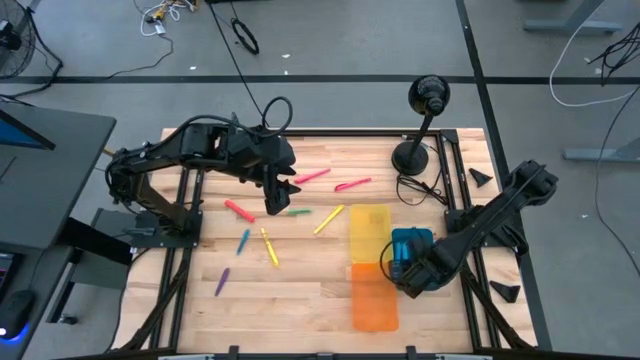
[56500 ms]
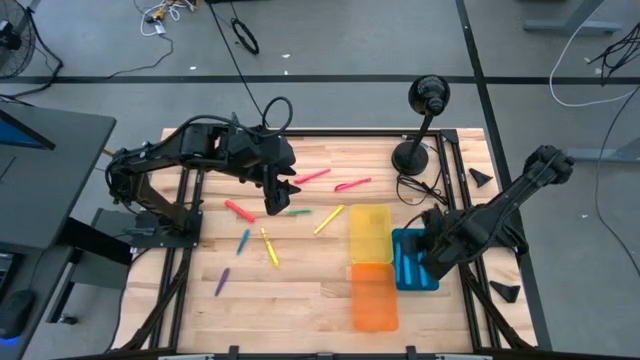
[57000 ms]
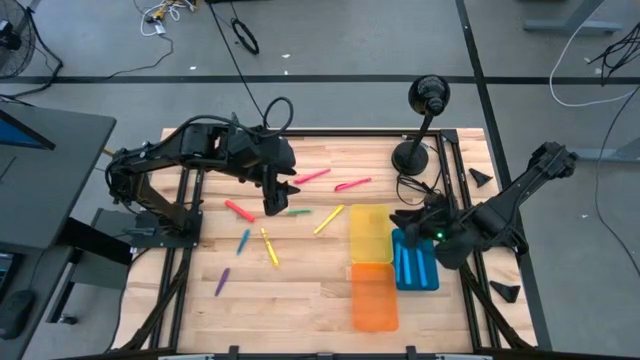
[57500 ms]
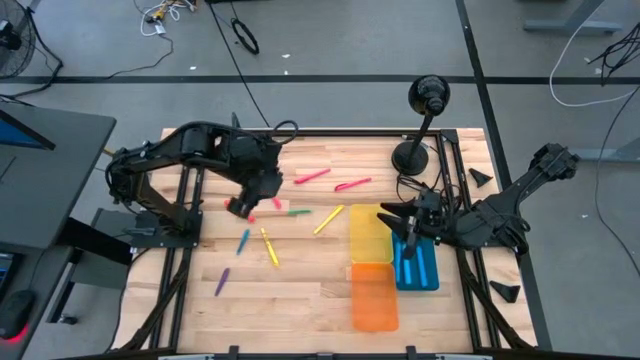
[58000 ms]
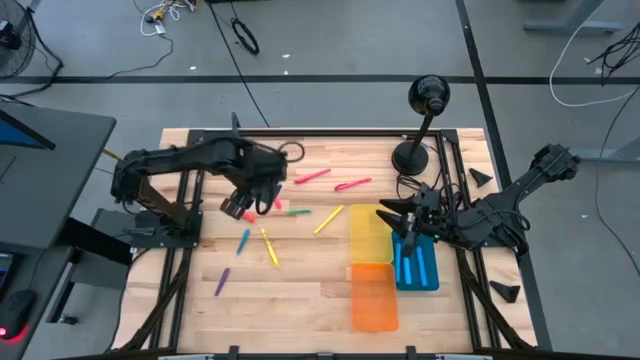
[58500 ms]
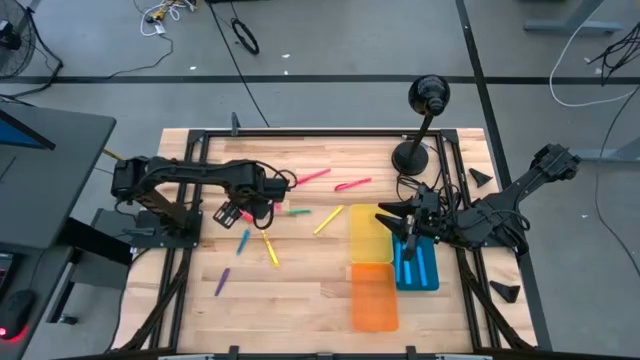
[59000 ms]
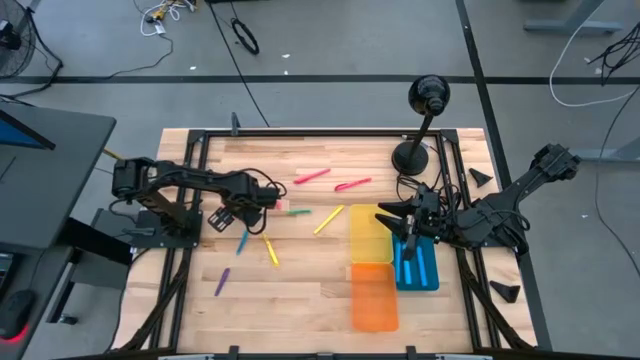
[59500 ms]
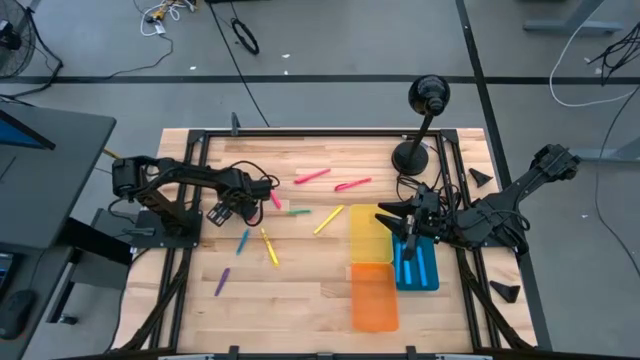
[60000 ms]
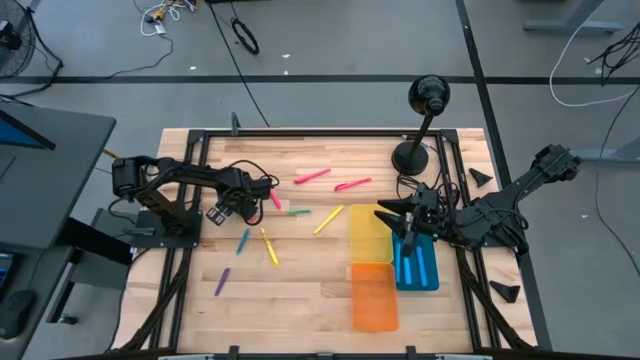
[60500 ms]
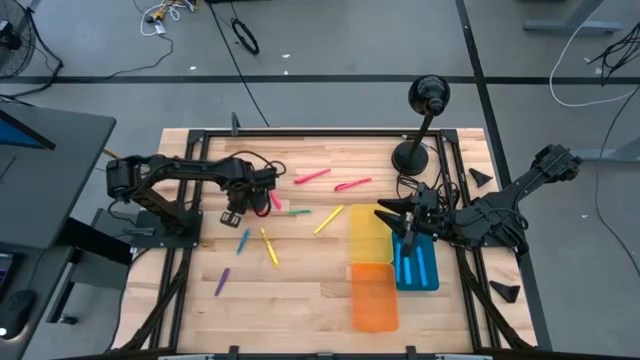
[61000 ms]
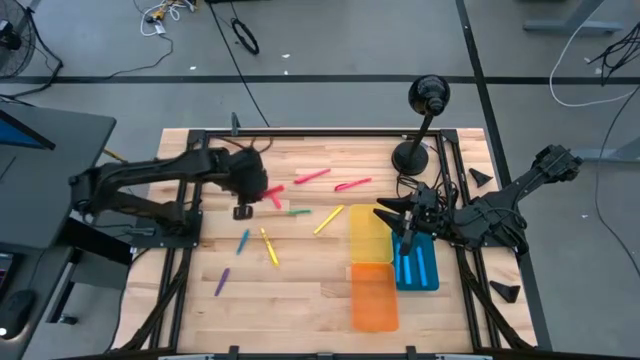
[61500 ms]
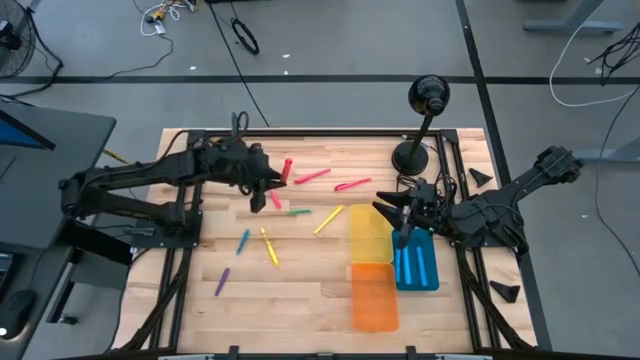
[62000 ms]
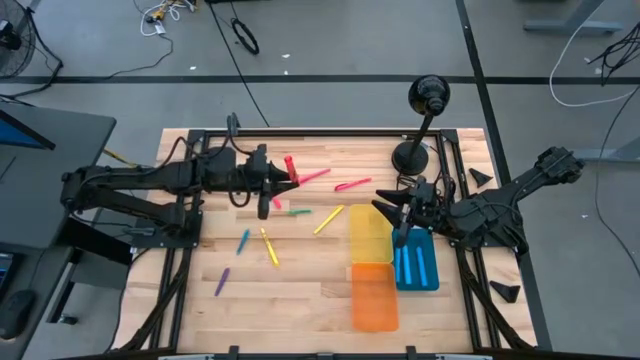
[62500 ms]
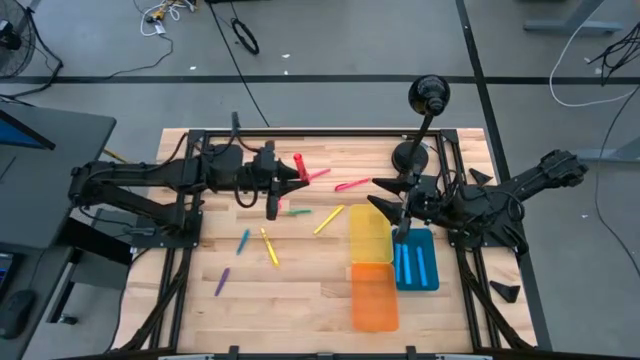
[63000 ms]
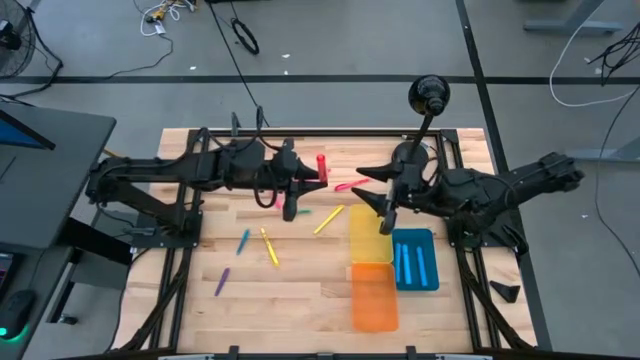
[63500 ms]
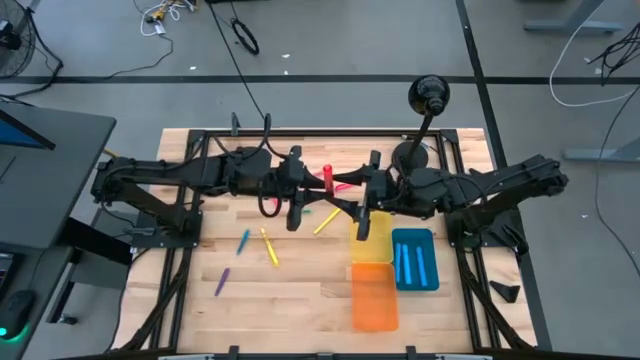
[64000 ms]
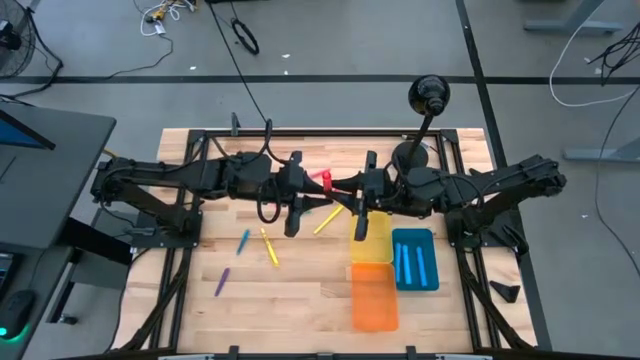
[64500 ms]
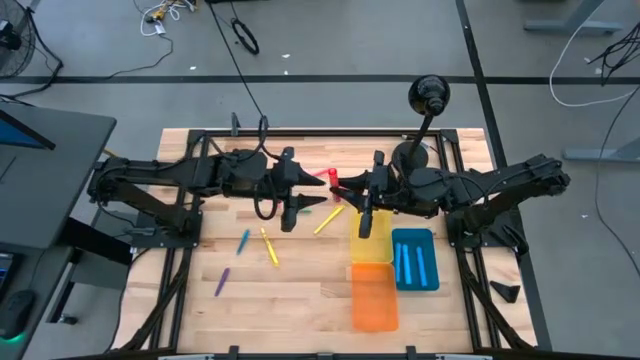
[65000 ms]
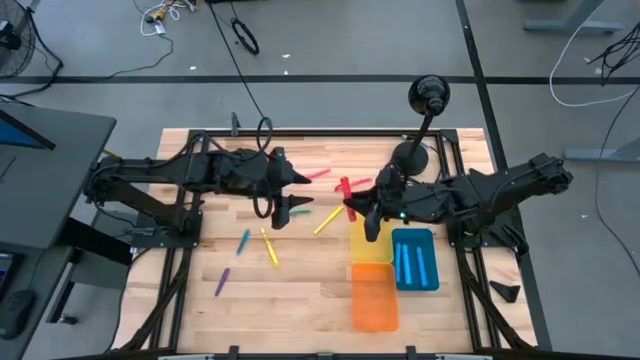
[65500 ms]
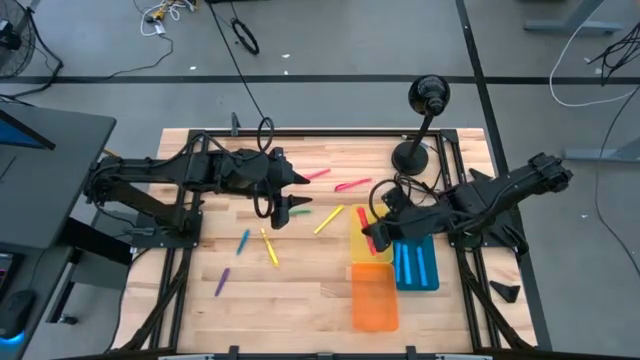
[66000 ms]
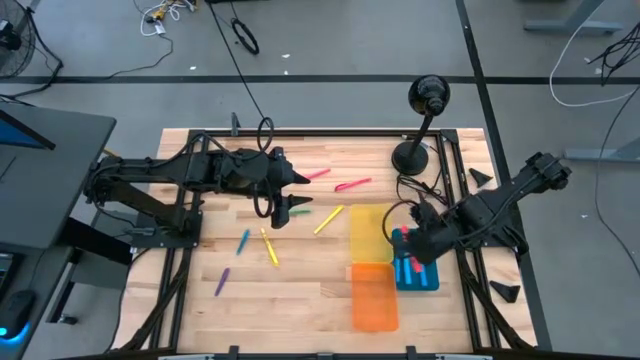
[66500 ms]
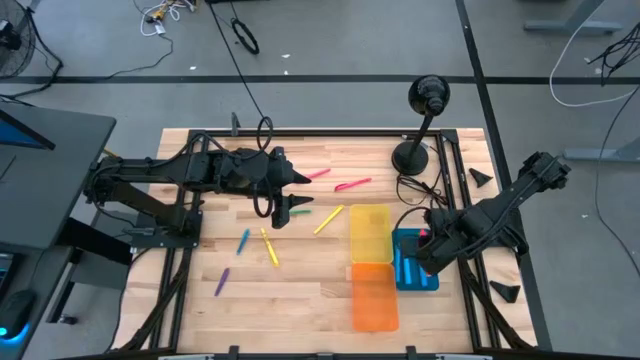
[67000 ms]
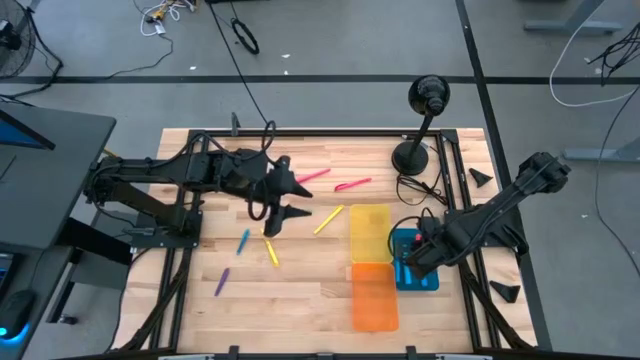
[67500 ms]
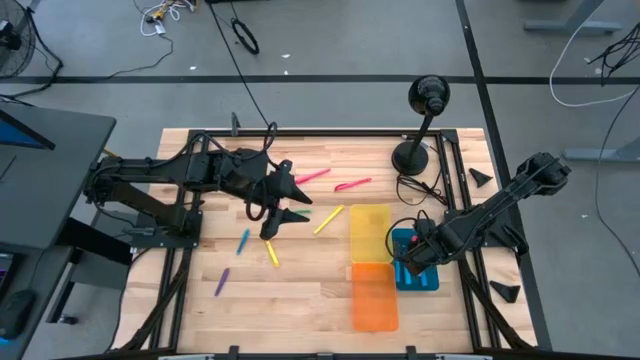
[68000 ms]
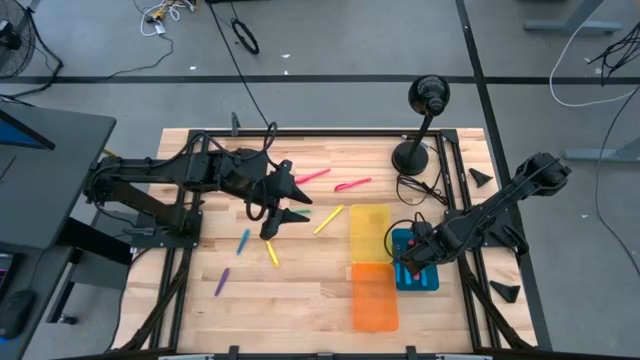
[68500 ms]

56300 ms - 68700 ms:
Task: Pick & Place Markers
Put the orange highlighter into the blue bin

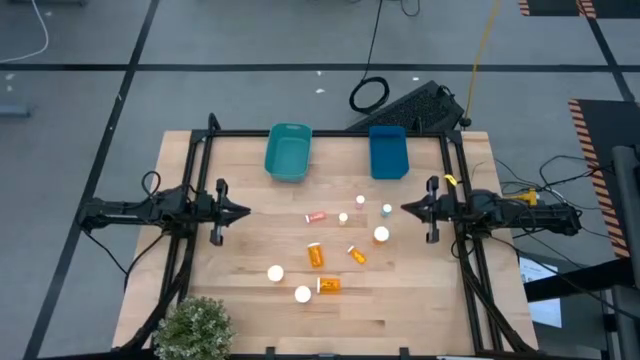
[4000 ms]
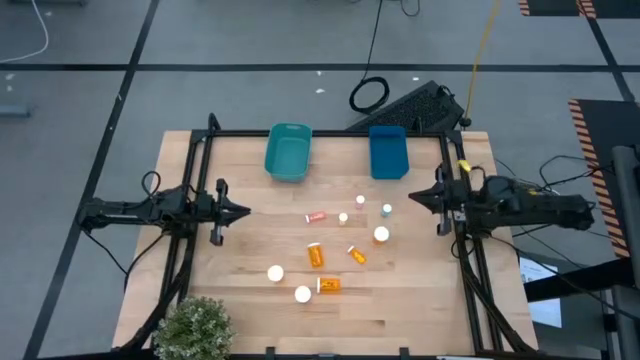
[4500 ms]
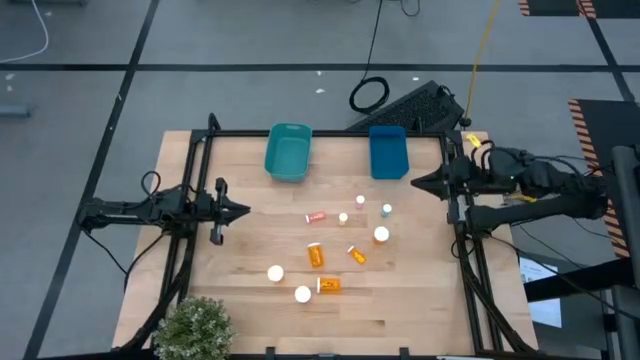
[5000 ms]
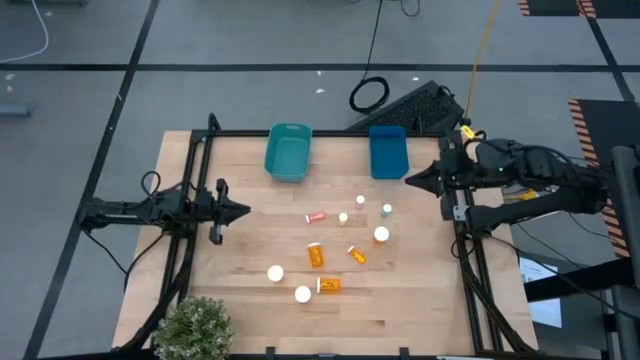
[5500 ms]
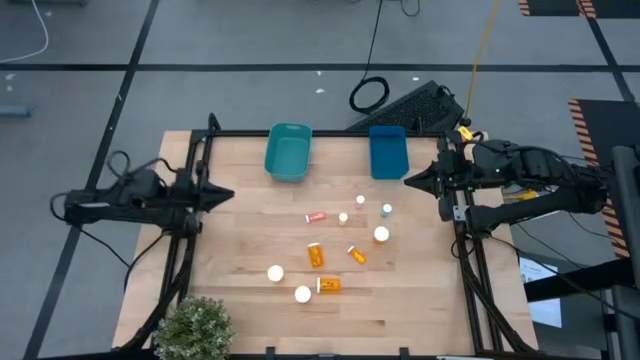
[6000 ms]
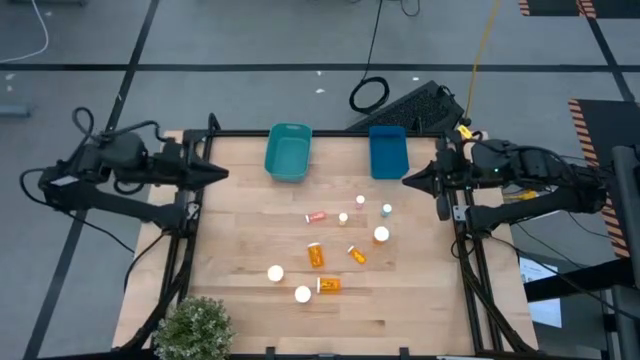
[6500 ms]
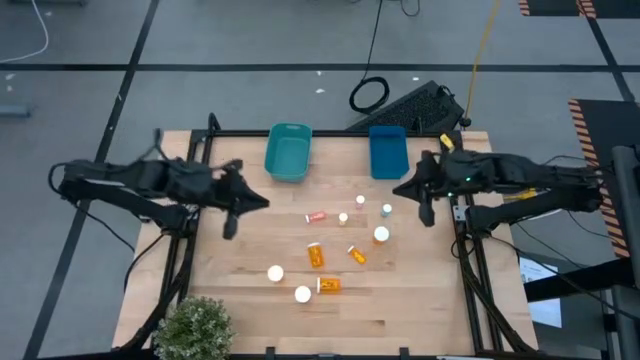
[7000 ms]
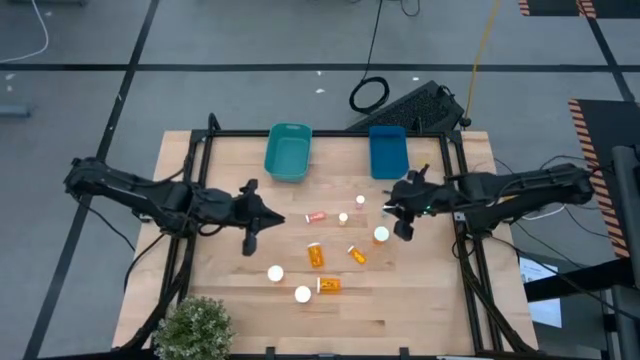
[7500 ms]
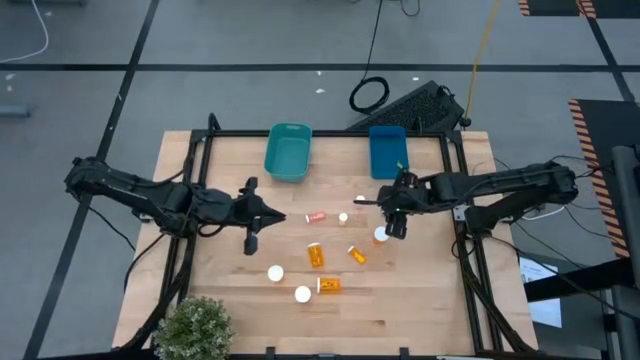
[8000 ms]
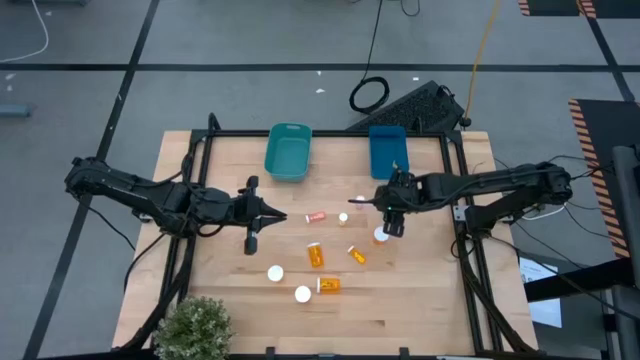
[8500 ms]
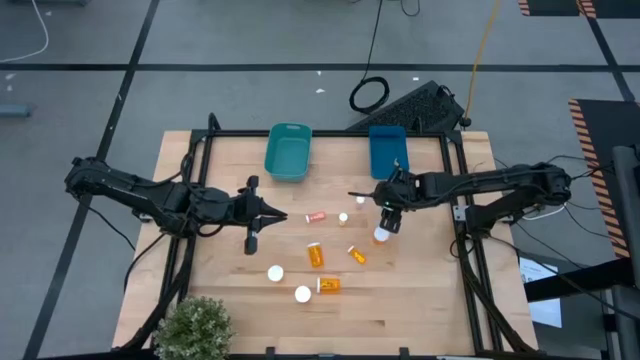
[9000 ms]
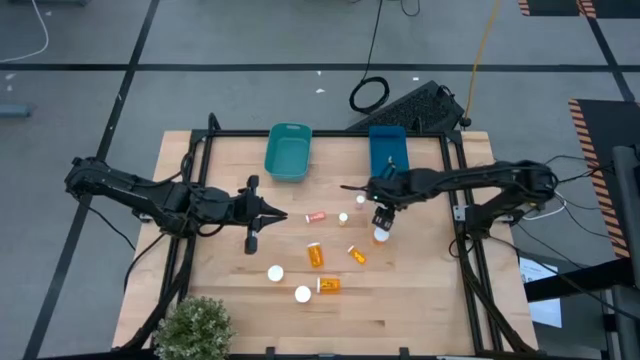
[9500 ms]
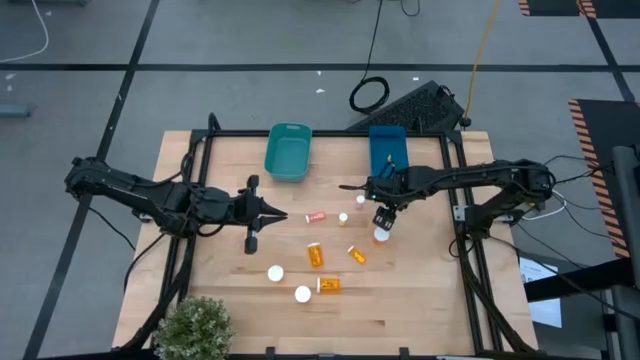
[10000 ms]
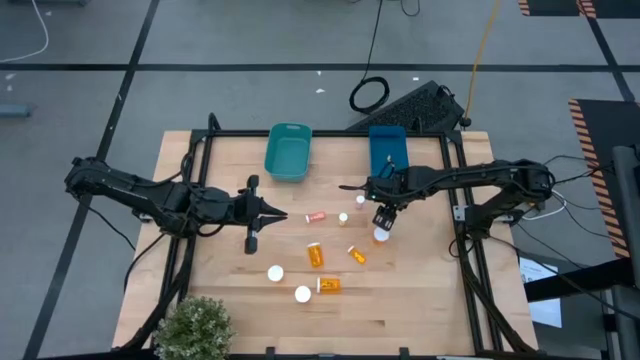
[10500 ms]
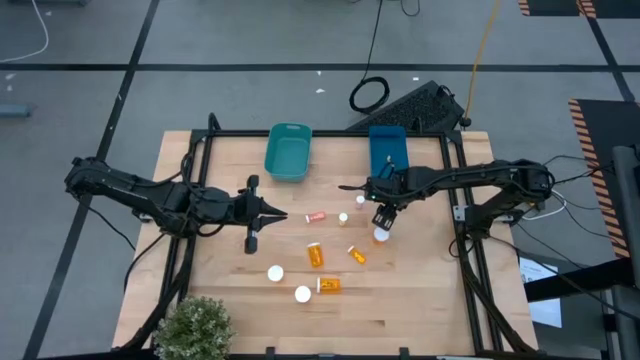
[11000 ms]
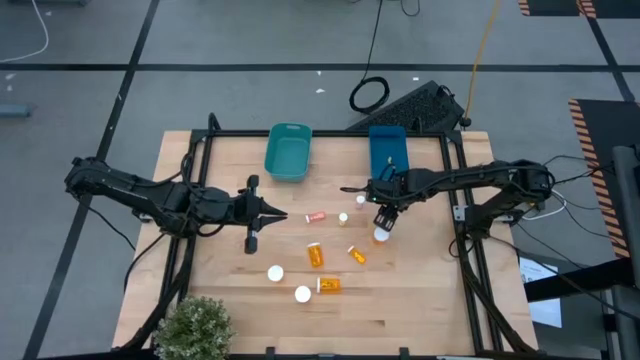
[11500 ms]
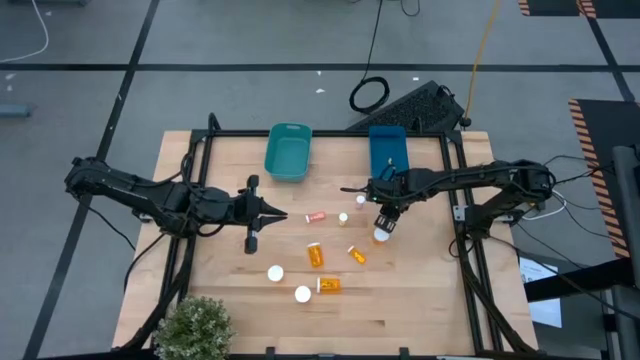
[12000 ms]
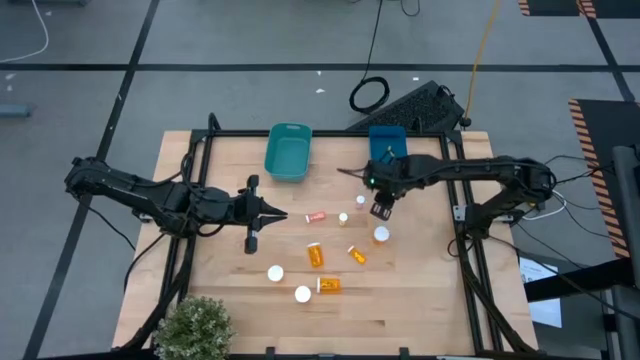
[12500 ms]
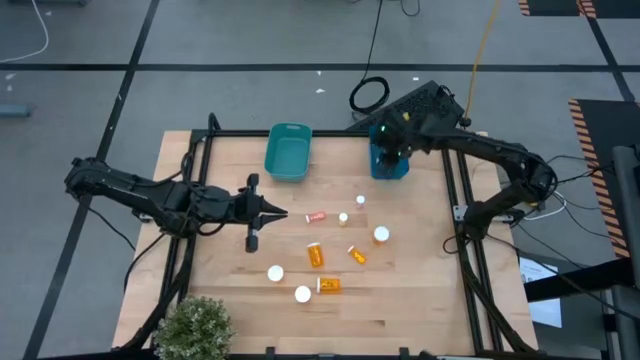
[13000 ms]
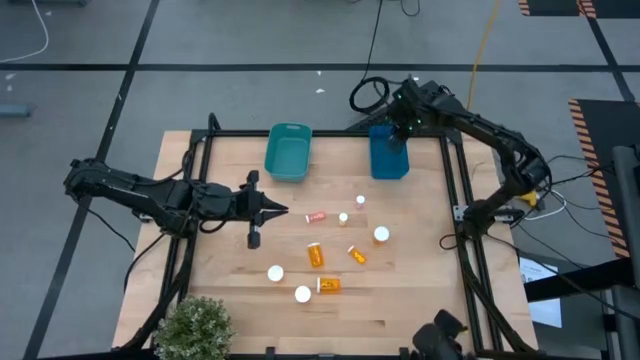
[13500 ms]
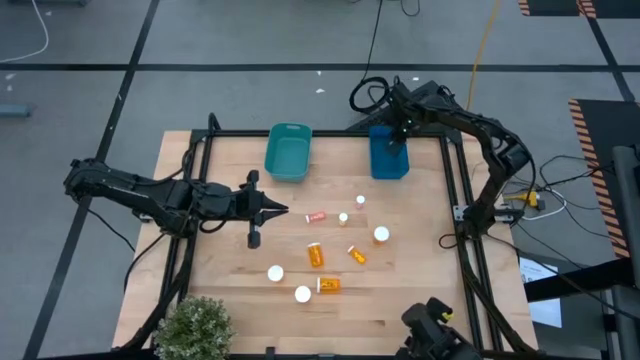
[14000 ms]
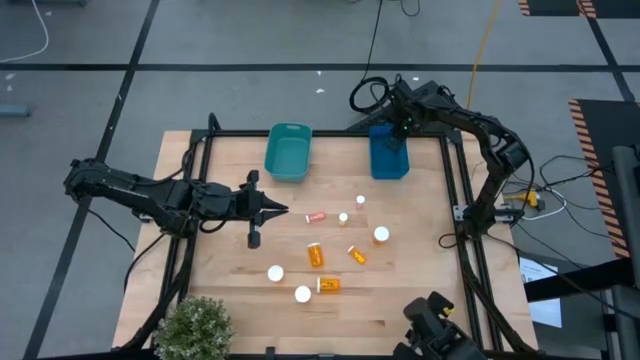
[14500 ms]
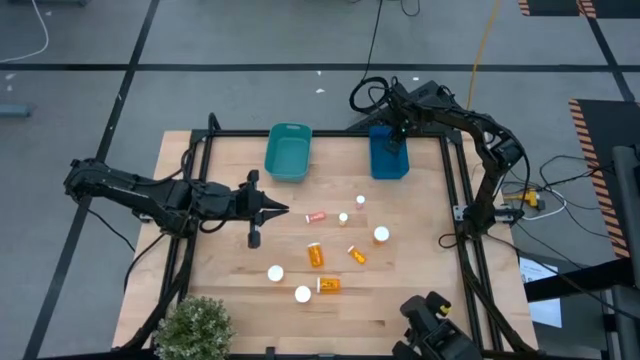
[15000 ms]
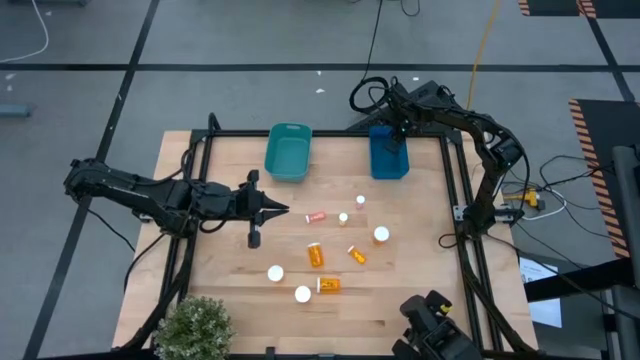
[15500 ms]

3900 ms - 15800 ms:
Task: Pick and place medicine bottles into bin by pill shape (circle, oval)
Put the small blue pill bottle into the blue bin
